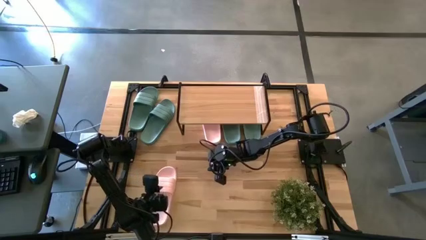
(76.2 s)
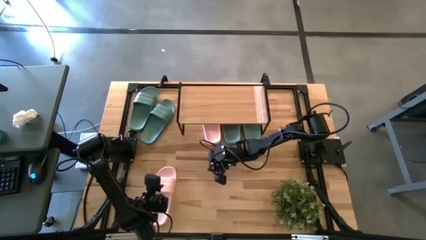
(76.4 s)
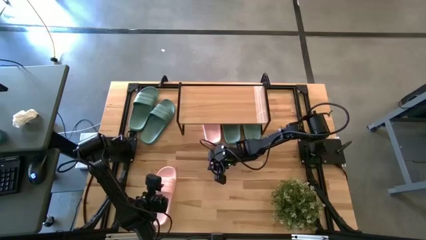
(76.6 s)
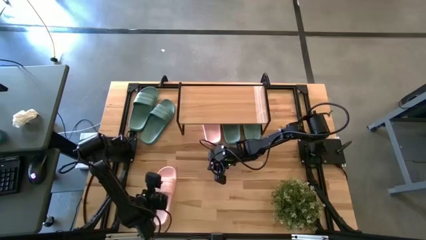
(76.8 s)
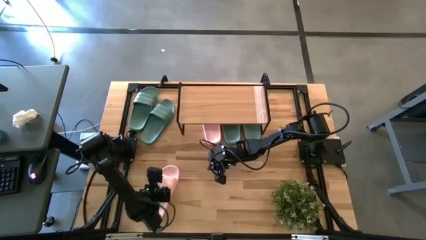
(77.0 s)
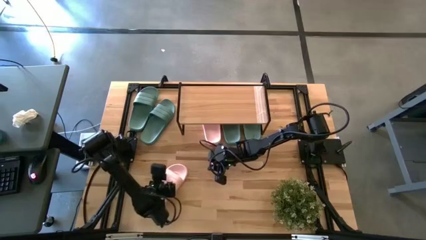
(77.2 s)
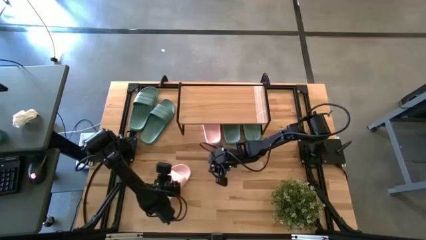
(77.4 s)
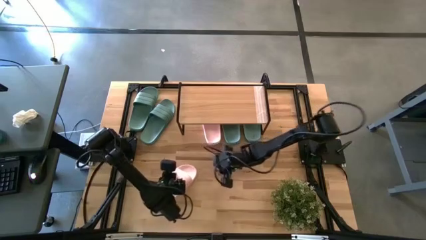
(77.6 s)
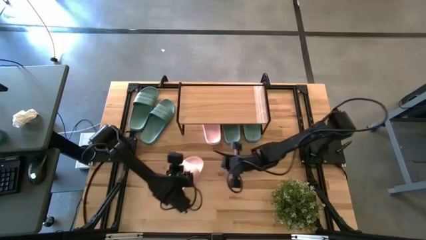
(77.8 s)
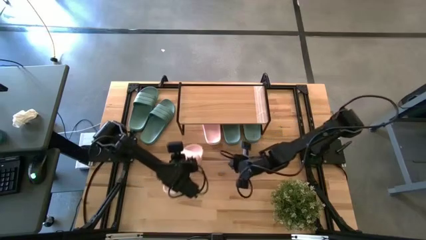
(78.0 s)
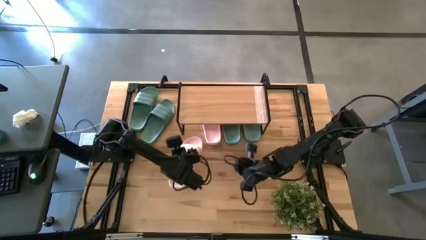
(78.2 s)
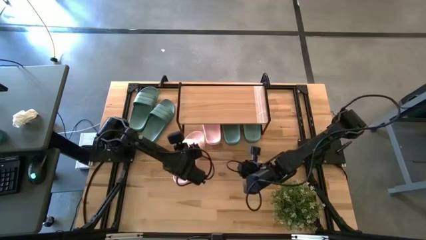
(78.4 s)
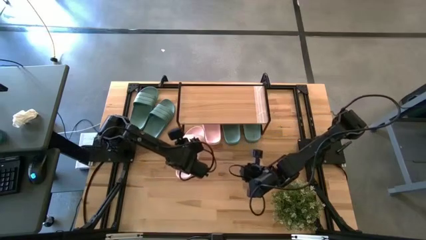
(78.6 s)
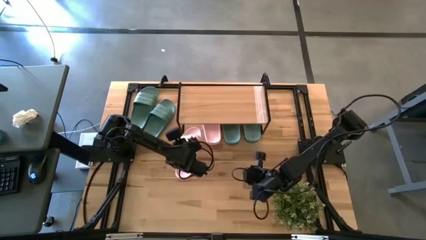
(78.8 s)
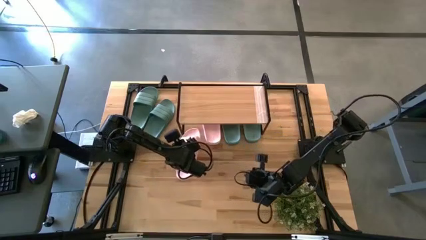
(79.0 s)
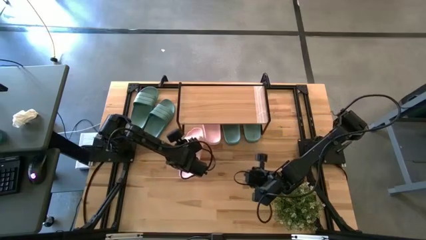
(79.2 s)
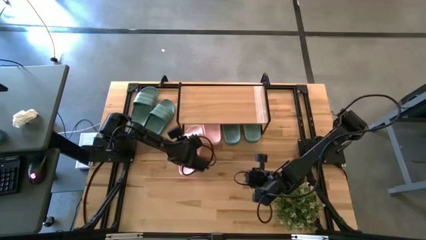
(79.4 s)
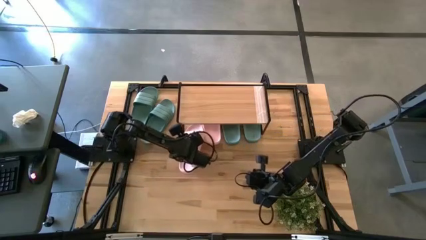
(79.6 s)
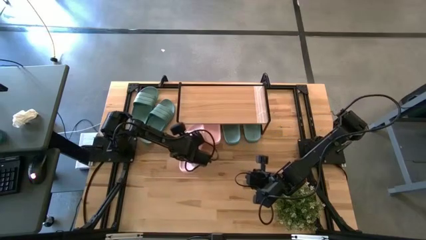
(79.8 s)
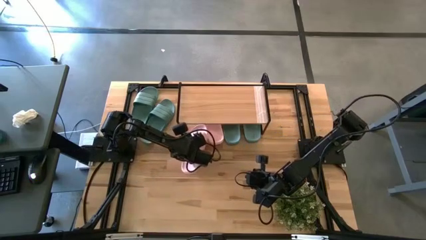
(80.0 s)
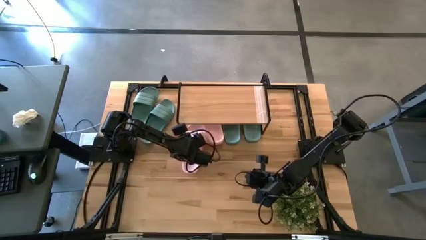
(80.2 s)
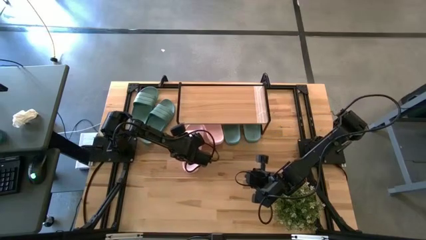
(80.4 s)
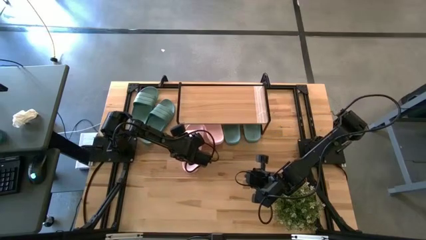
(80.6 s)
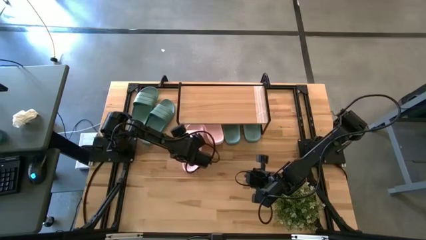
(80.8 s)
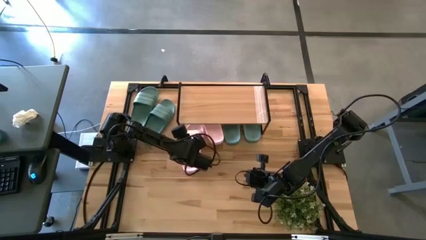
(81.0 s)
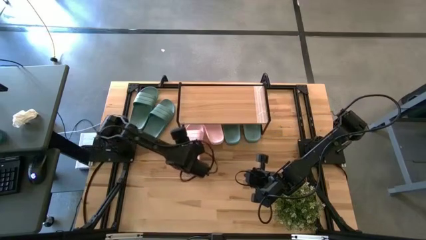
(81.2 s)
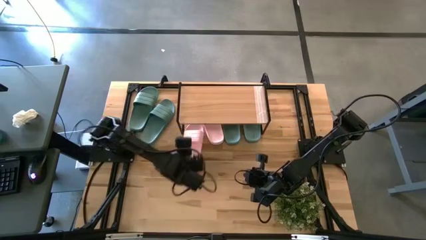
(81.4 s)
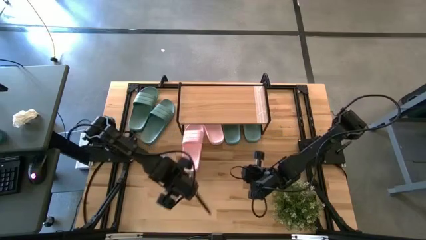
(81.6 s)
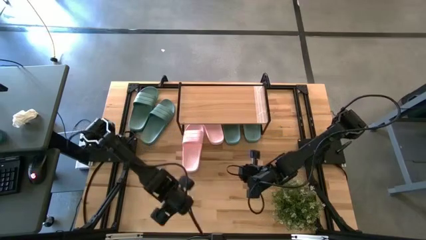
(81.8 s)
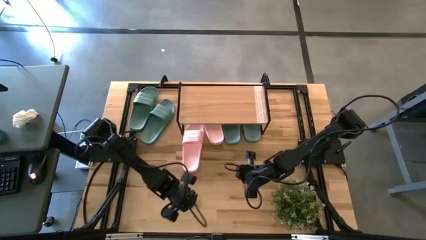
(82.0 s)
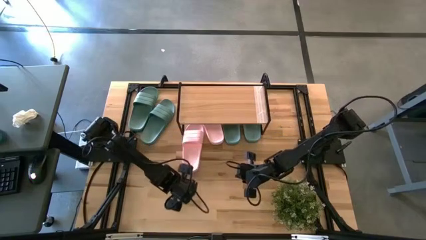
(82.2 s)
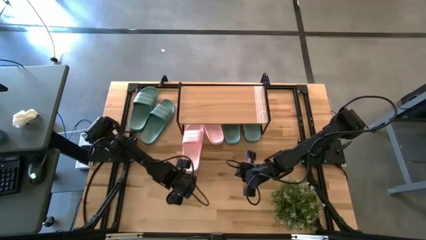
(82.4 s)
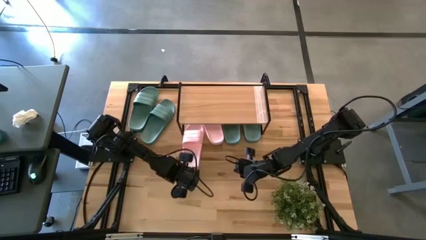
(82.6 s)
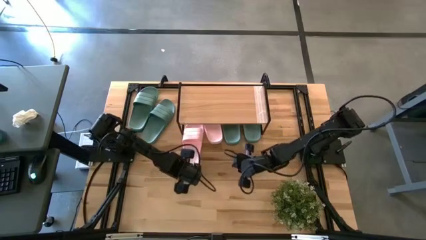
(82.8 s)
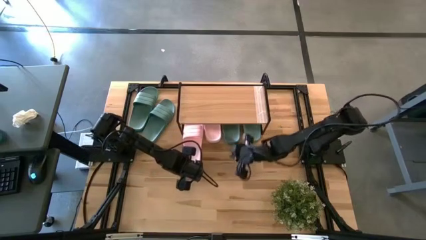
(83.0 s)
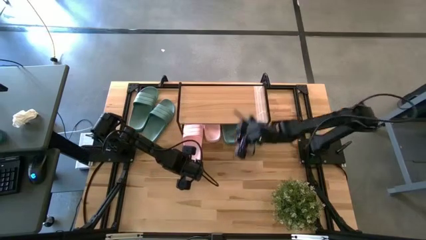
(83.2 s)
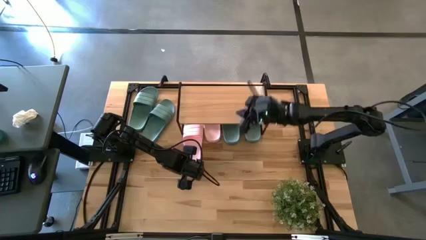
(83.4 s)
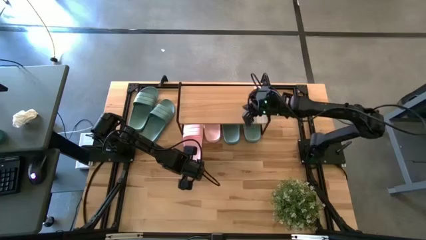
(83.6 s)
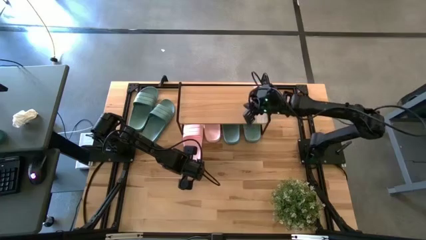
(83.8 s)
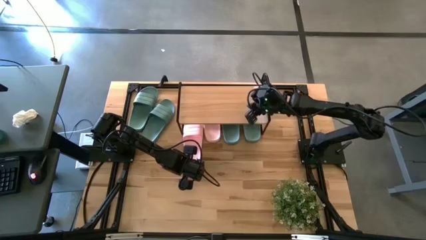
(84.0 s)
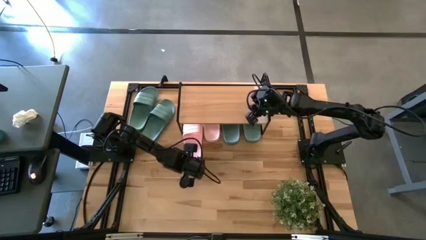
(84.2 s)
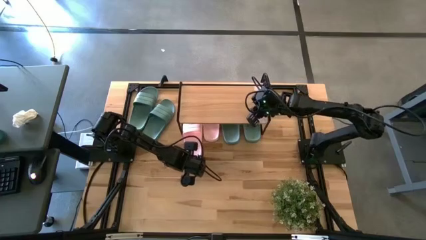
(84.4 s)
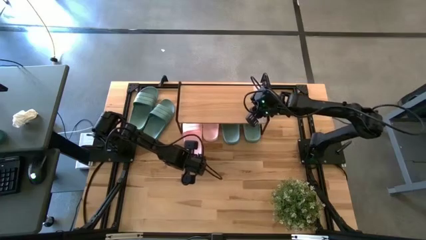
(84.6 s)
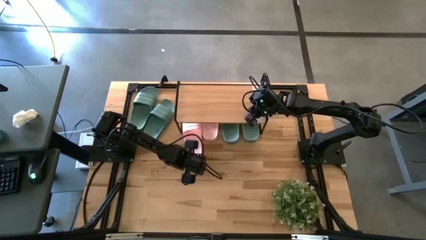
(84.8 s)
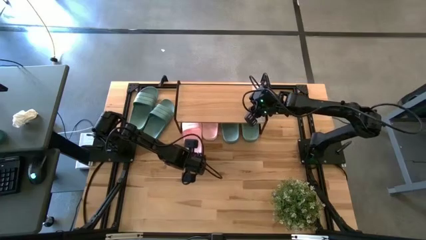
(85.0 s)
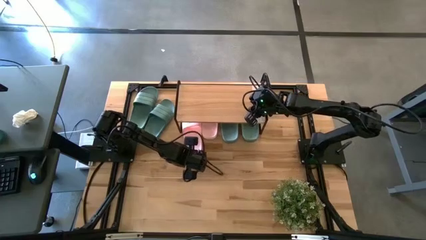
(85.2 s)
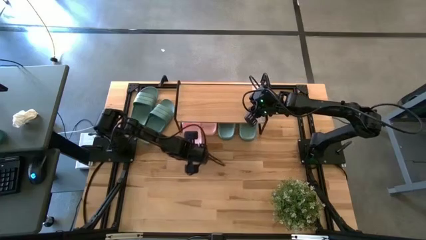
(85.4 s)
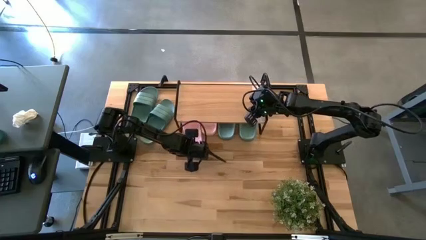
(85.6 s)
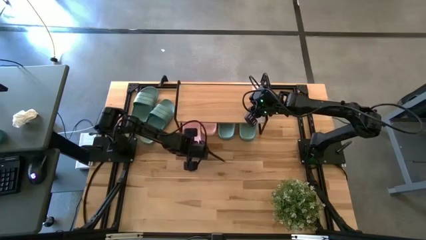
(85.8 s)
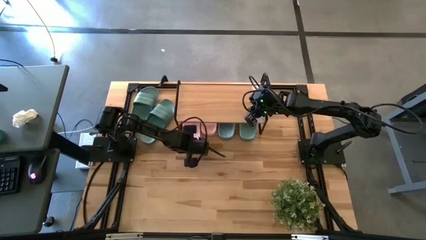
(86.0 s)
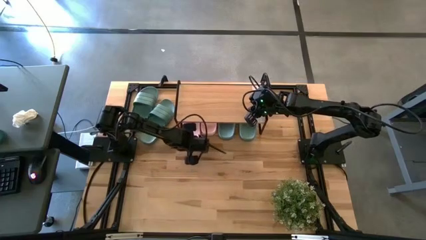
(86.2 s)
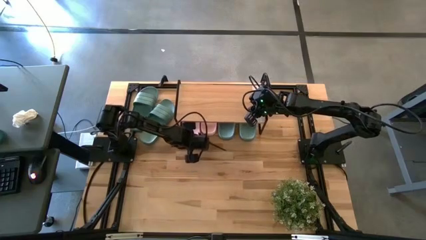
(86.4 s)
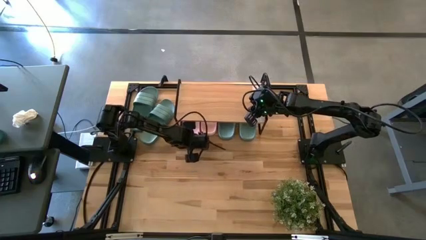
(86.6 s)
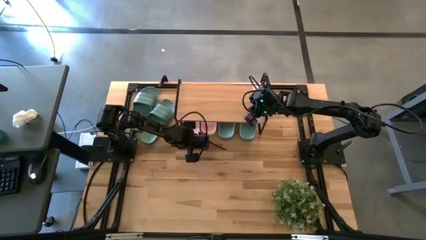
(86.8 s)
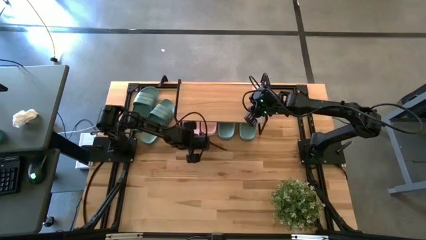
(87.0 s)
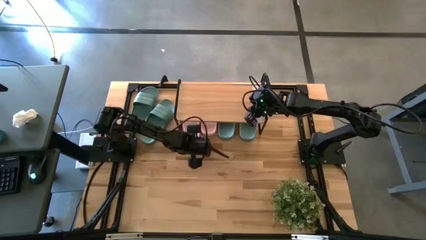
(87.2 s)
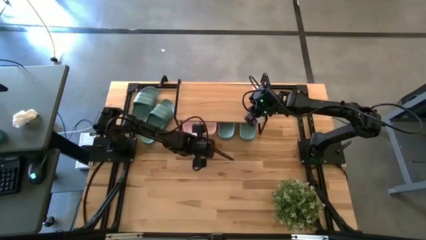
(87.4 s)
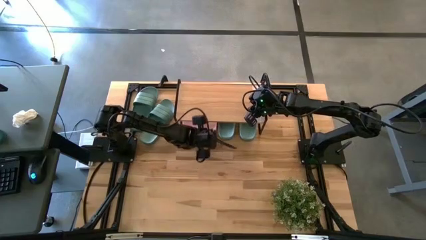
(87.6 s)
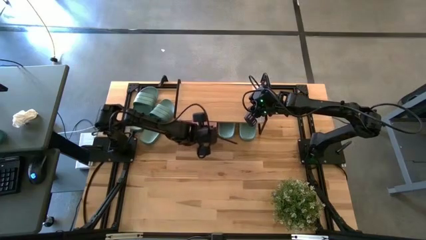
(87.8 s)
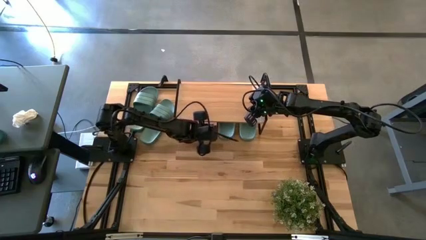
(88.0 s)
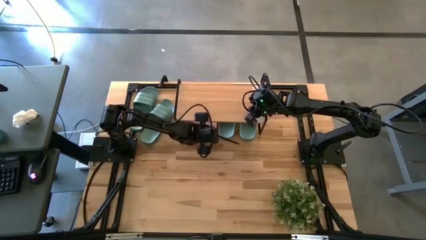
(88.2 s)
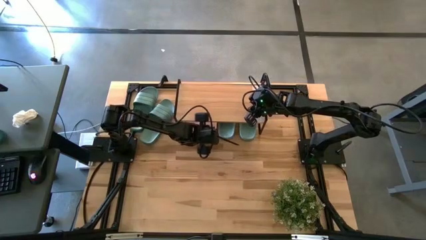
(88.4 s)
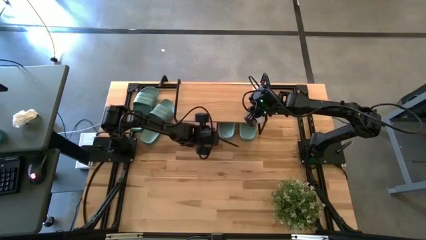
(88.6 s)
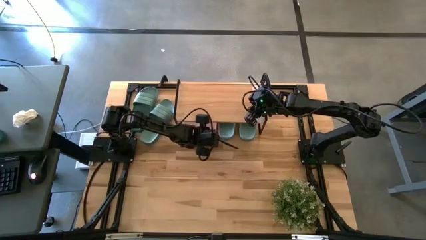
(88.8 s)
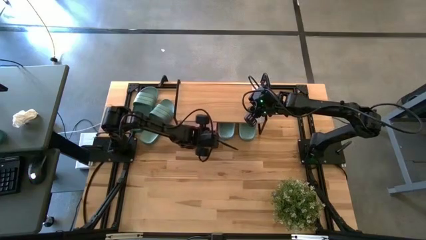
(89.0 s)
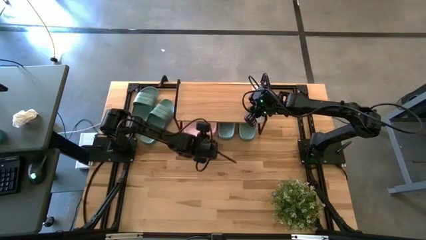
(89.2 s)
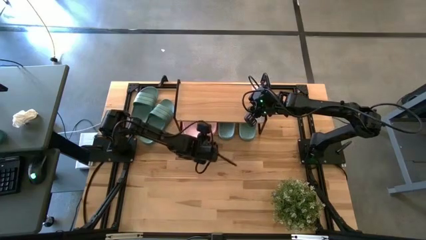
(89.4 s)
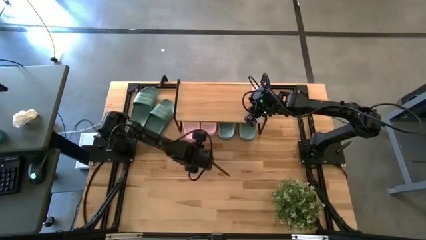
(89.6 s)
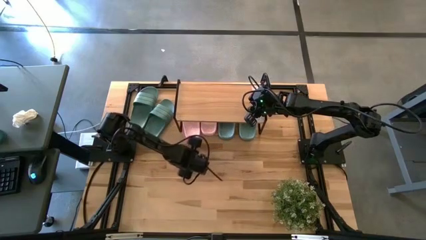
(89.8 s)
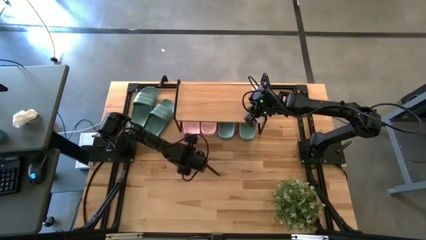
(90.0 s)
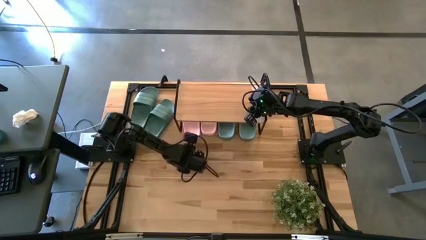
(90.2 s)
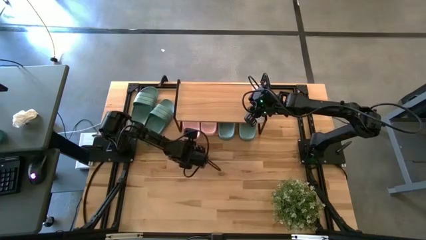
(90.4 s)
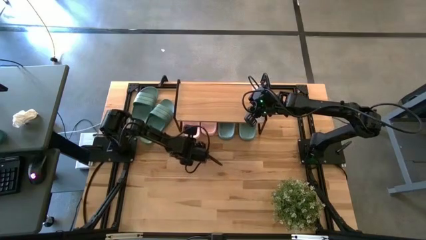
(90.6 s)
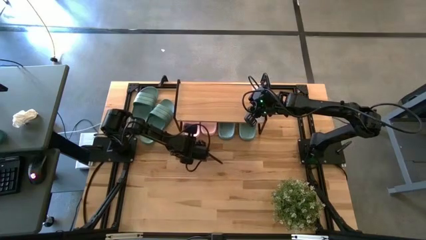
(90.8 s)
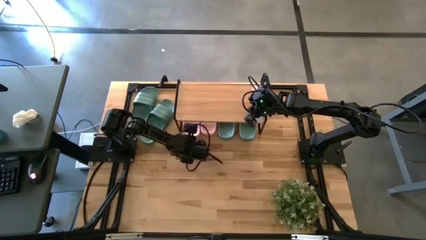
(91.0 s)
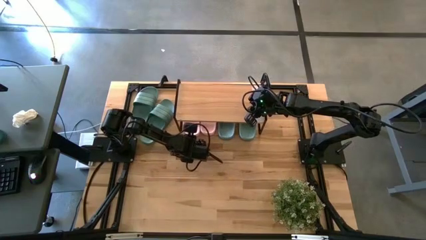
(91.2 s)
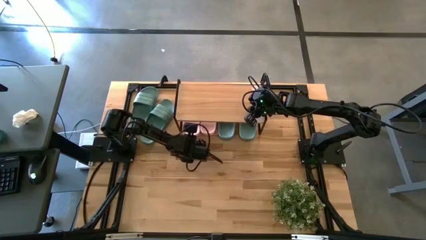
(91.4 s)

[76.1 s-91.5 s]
Task: Pick and place slides into the shelf
Put the pink slide under the shelf

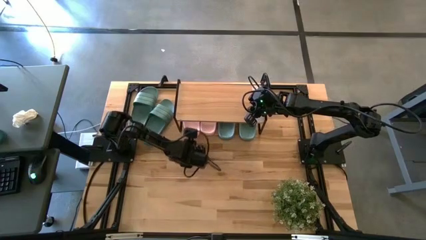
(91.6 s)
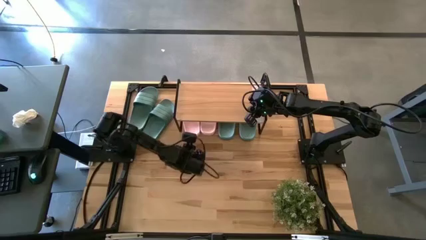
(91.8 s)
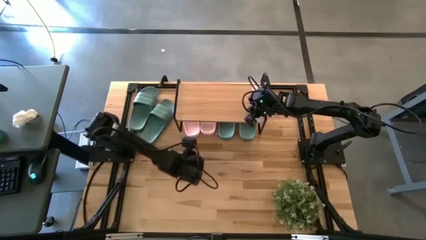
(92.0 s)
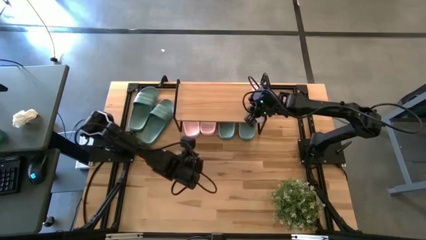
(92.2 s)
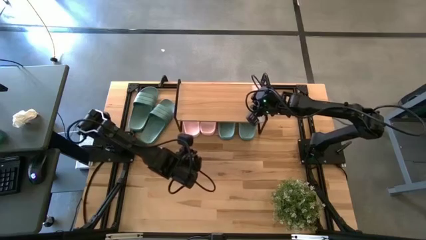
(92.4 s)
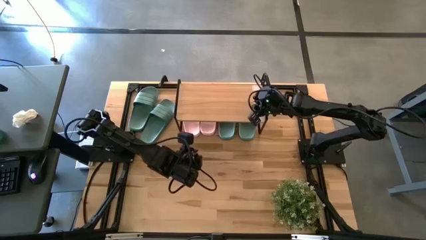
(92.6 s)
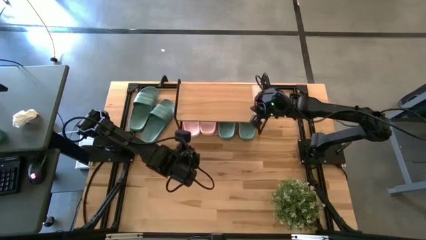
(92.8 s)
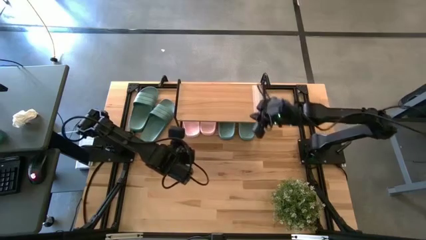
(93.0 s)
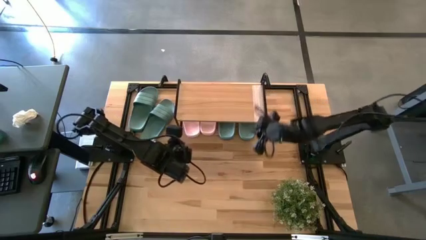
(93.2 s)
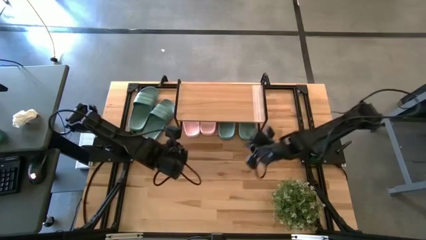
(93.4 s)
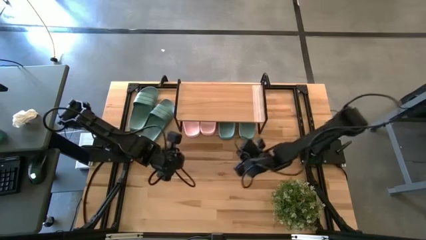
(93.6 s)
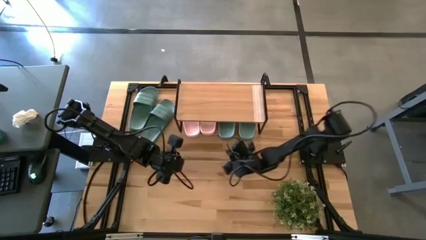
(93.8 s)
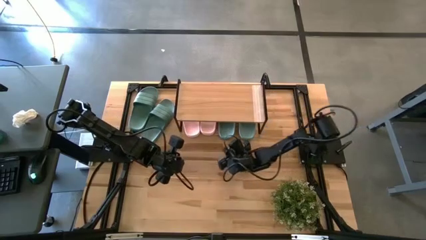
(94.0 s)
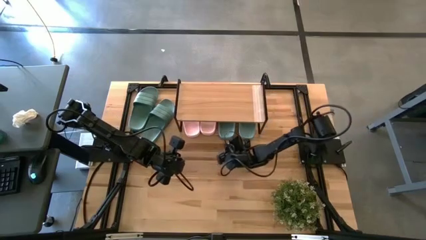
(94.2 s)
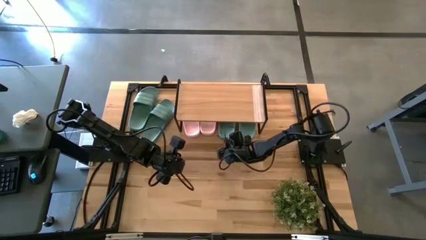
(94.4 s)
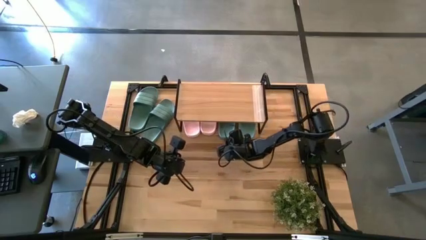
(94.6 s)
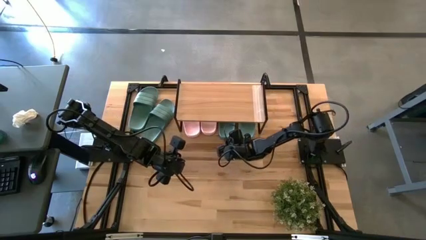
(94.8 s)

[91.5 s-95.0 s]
Adjust the green slide under the shelf
